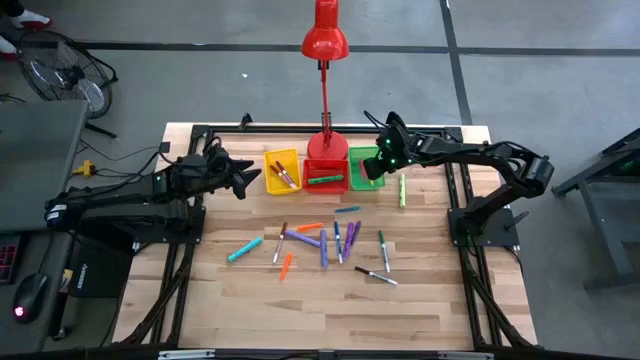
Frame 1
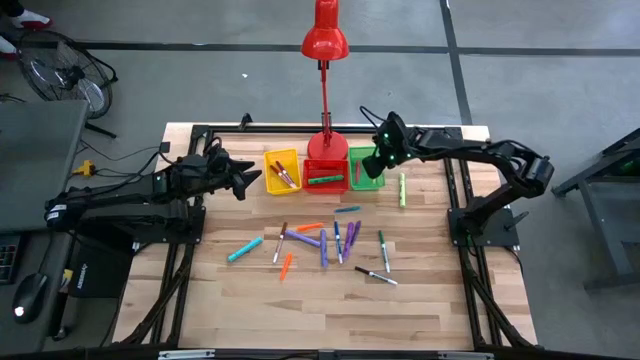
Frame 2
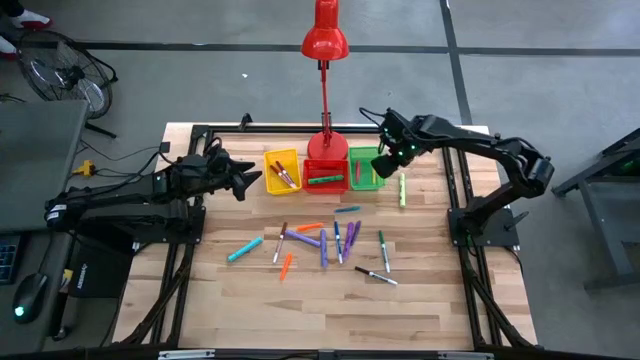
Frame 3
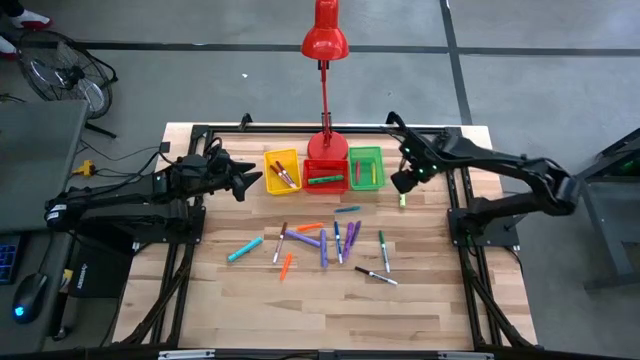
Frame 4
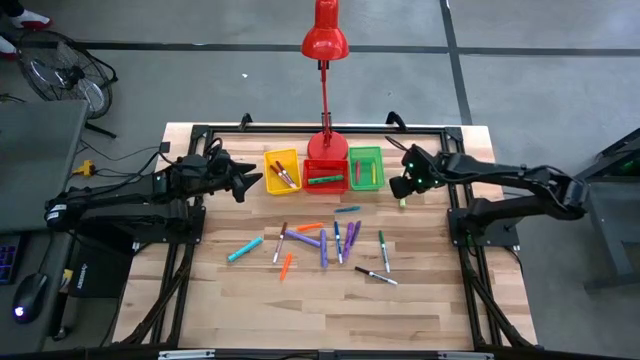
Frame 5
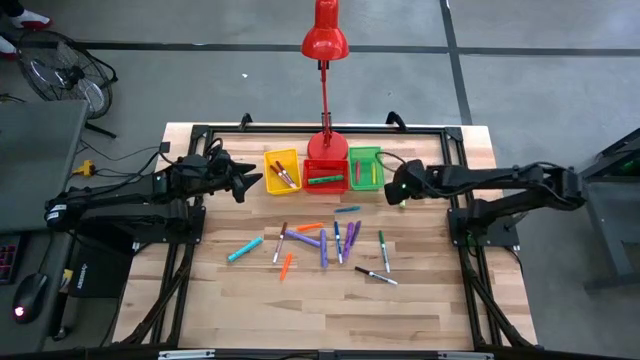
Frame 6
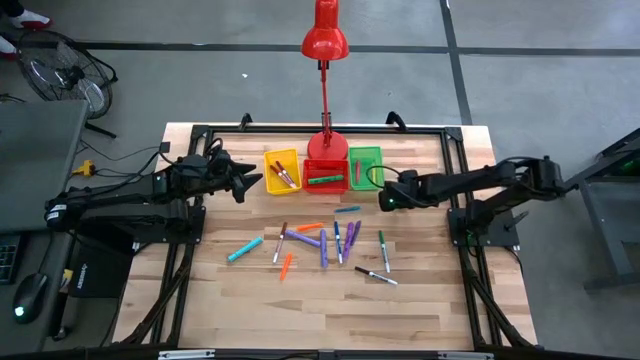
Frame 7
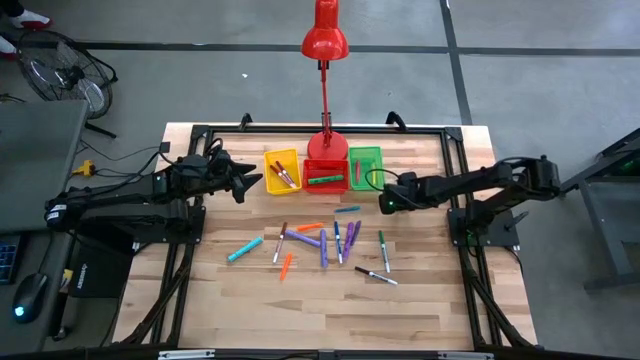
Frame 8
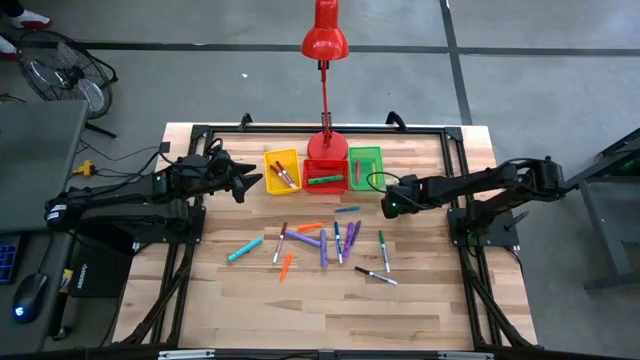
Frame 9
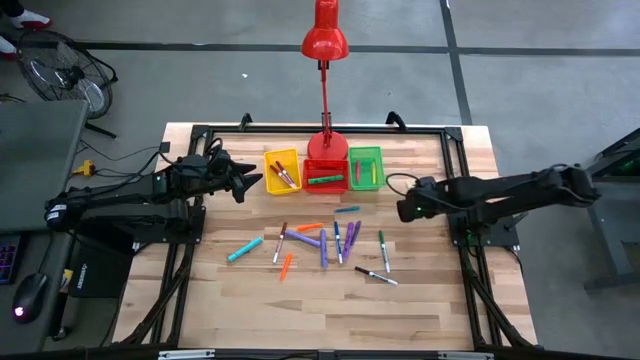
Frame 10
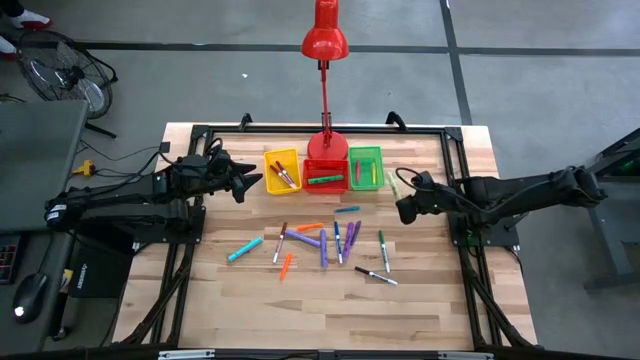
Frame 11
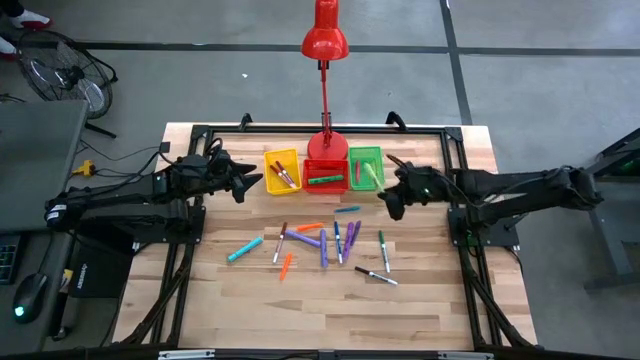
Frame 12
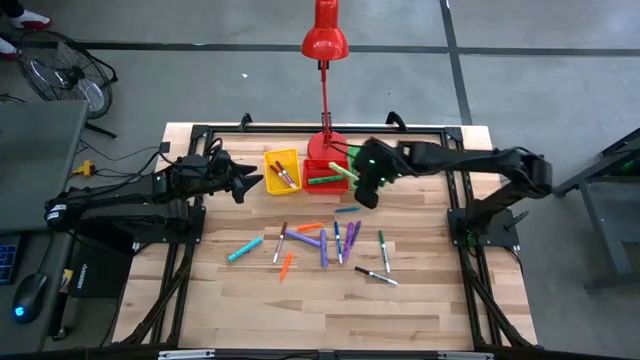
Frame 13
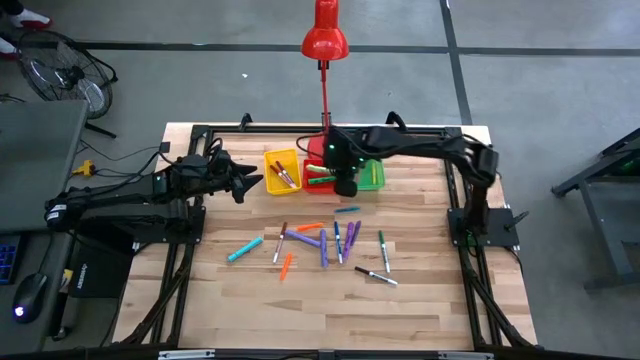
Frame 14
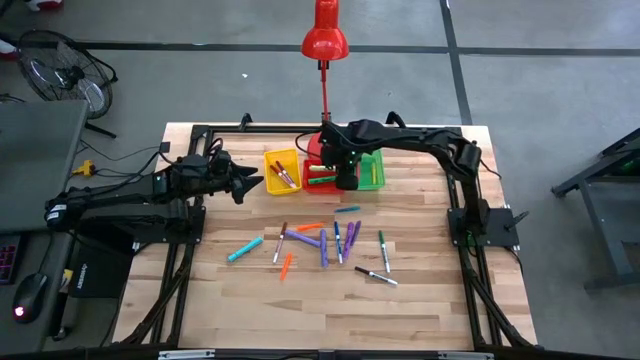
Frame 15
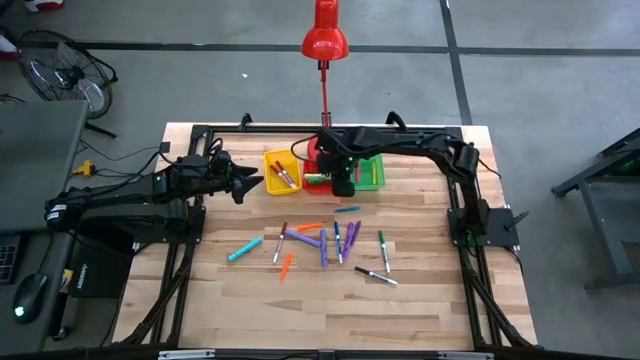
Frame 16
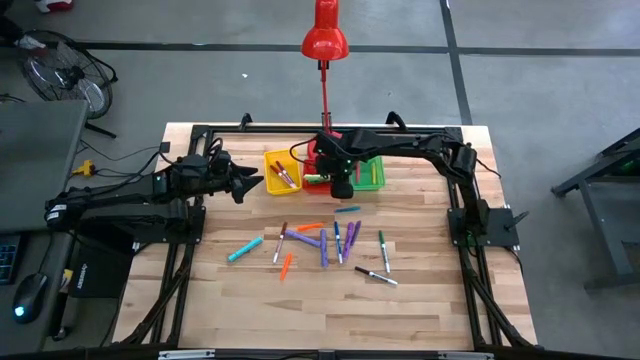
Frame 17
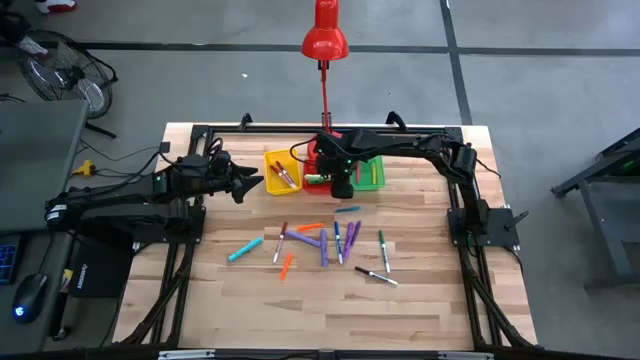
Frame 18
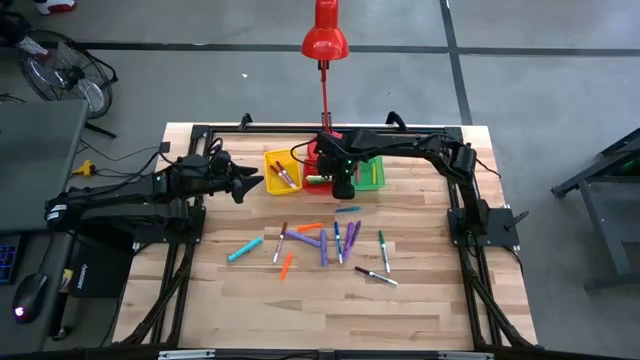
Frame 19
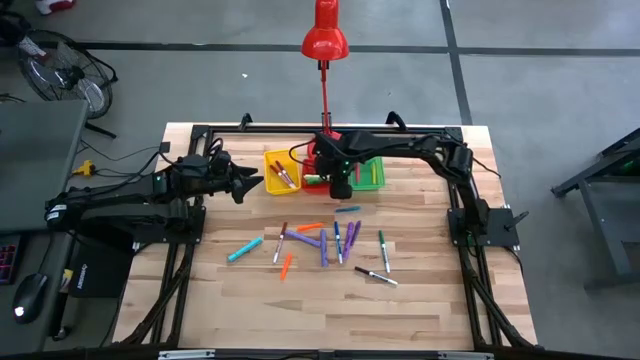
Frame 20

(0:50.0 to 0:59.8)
Task: Pick & Place Markers
Put the light green highlighter pen into the red bin

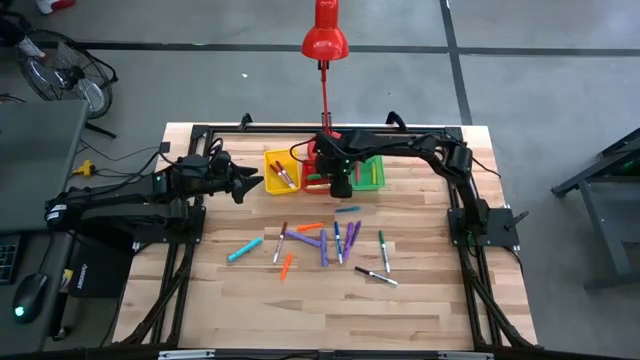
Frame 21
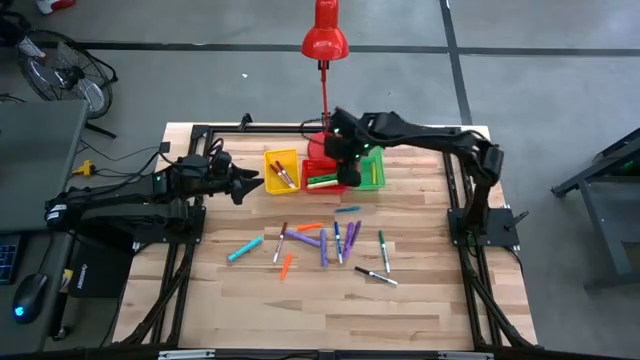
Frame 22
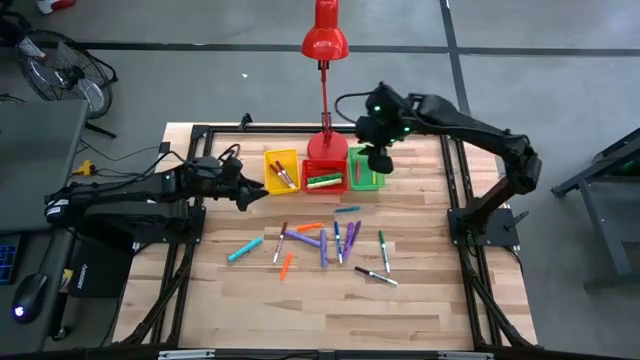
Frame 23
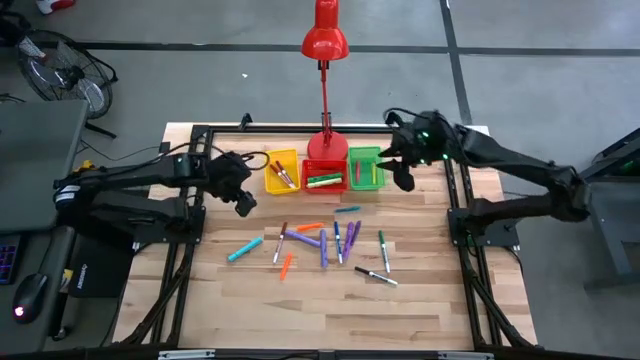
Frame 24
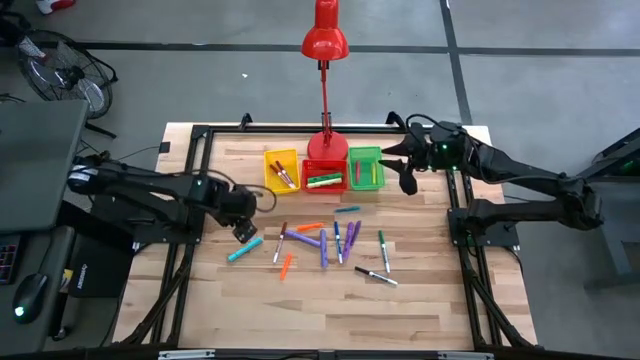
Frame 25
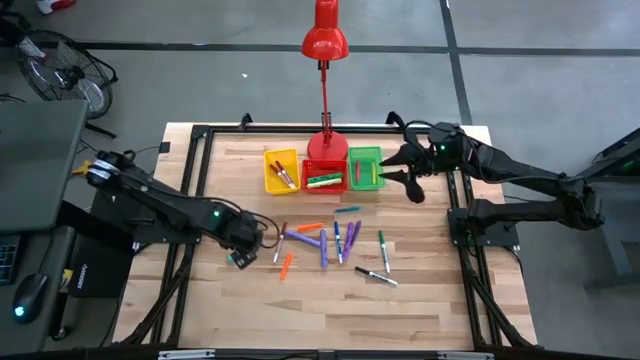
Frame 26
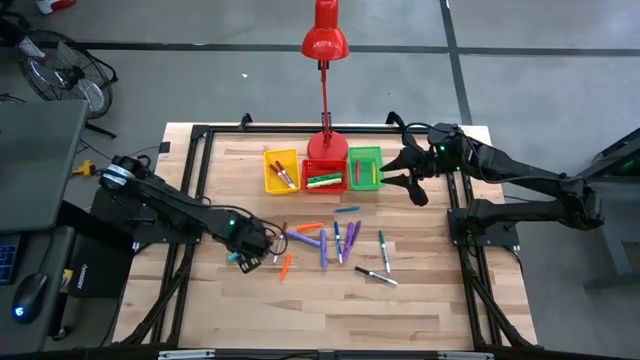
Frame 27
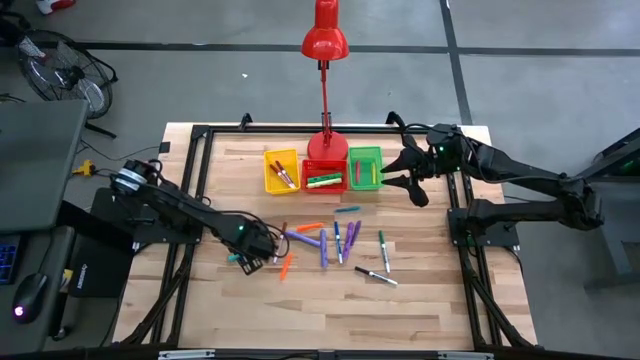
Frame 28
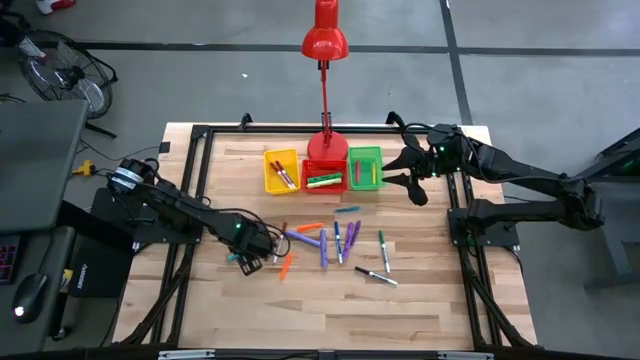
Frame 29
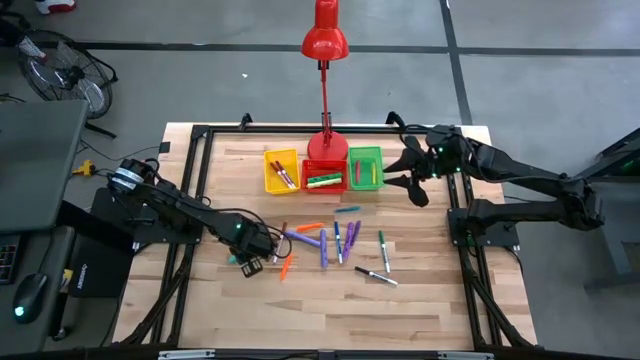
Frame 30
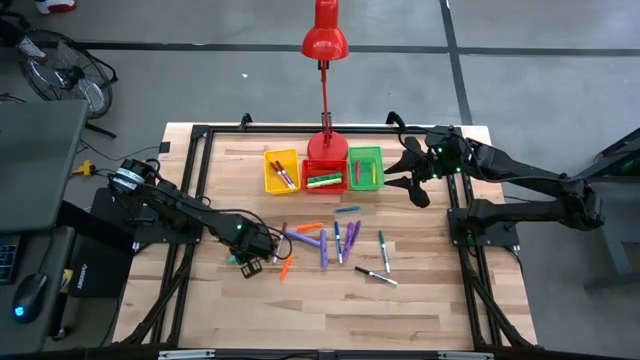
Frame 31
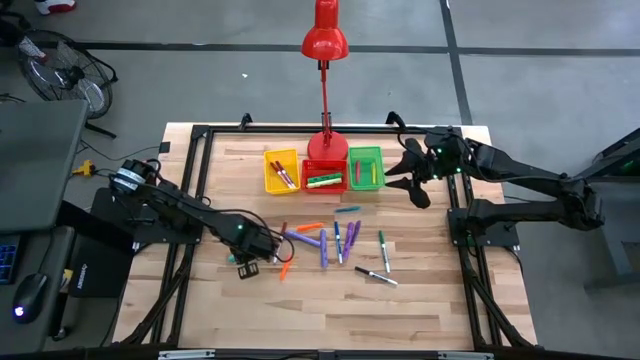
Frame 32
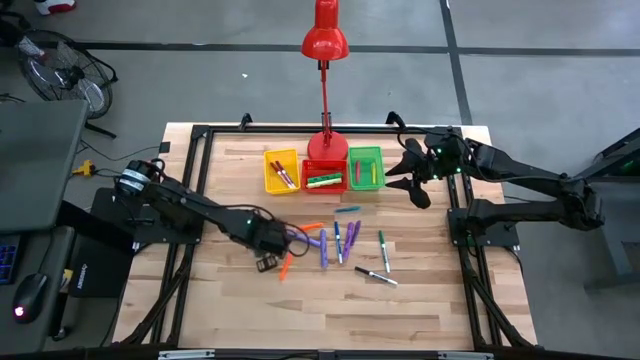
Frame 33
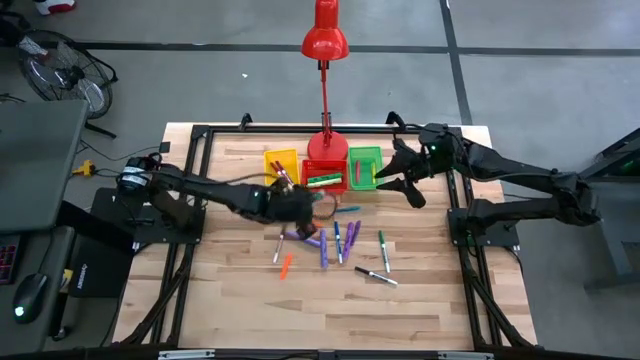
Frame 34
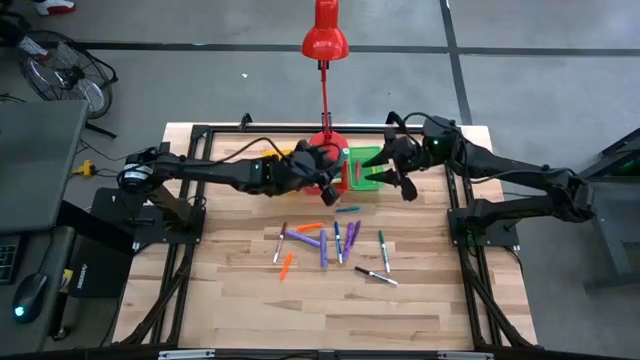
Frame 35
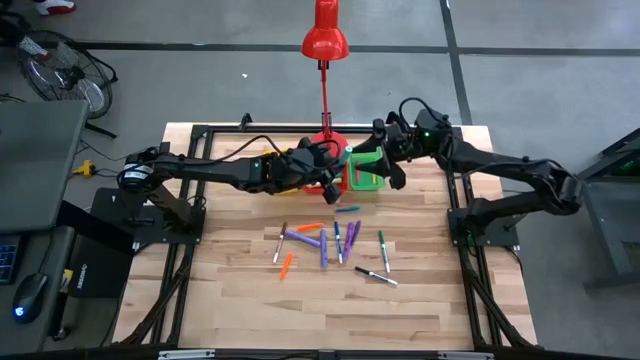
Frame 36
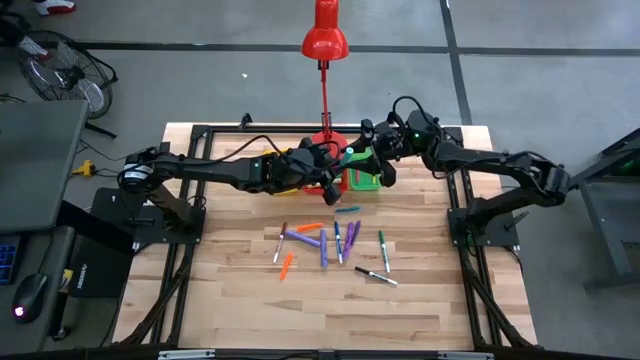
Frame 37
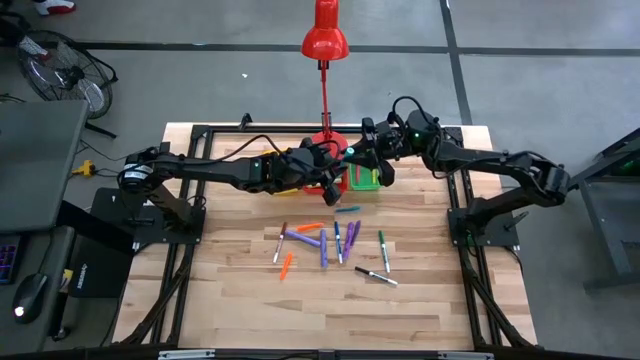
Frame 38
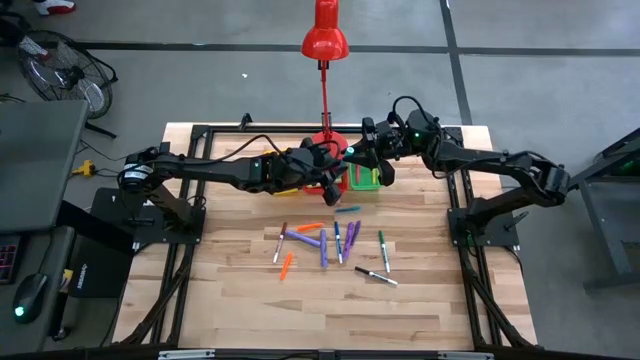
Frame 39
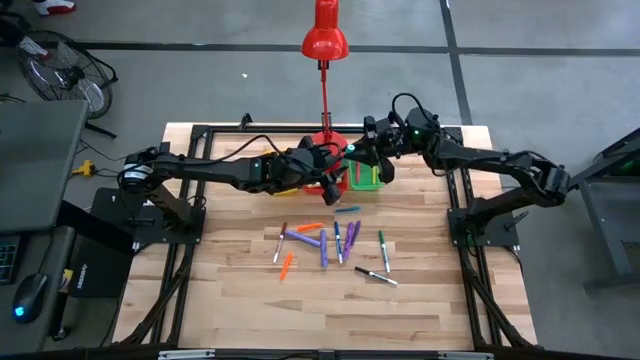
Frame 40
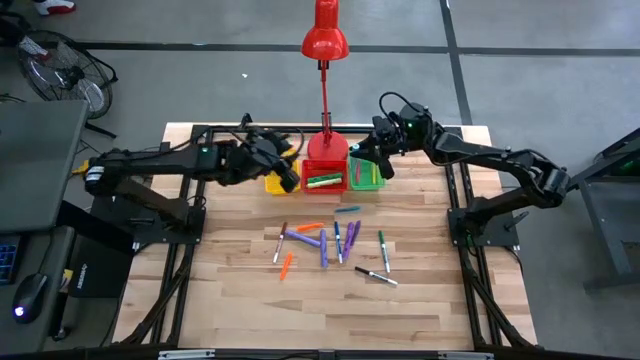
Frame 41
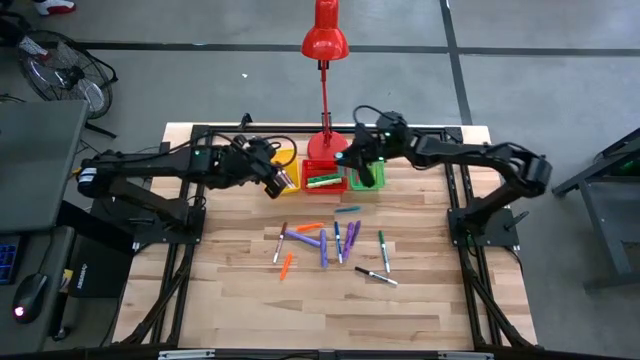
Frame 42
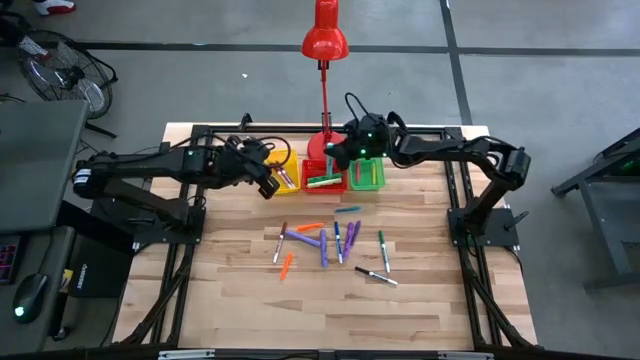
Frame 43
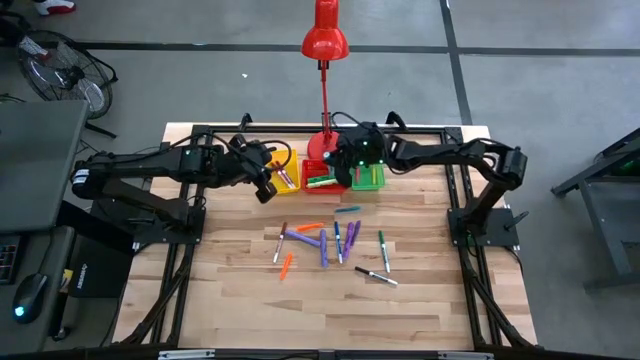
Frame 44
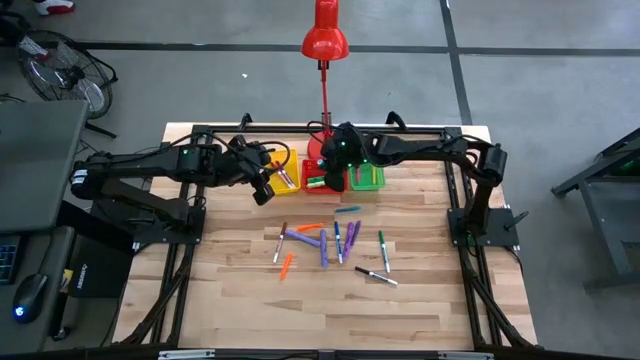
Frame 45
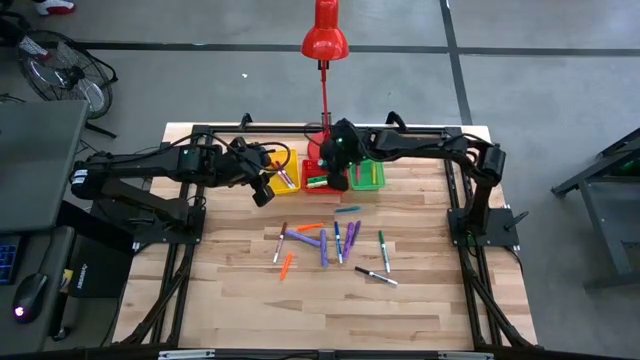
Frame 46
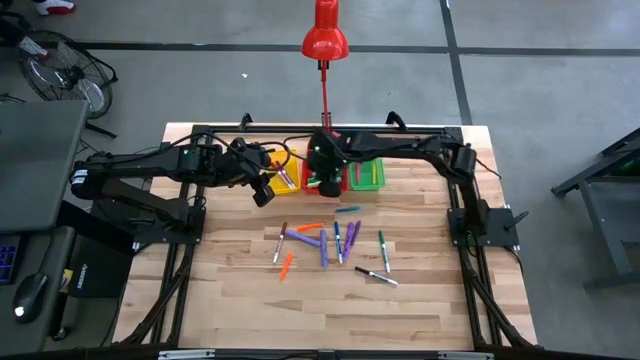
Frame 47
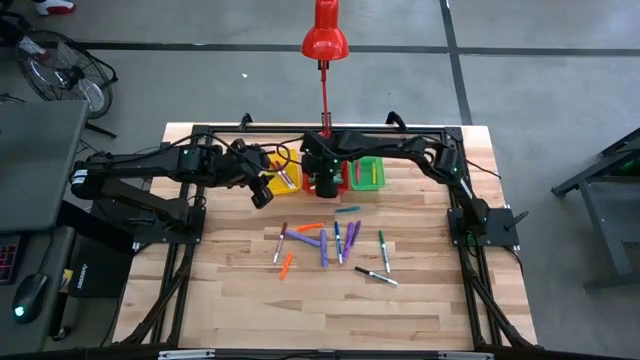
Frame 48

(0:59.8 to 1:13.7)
Put the blue highlighter pen into the red bin
